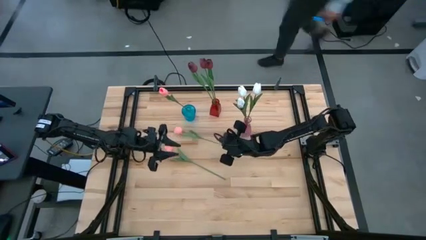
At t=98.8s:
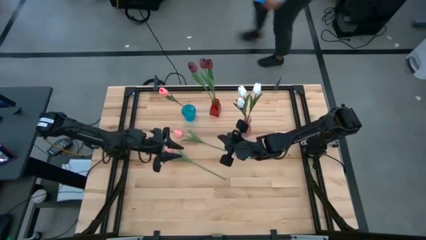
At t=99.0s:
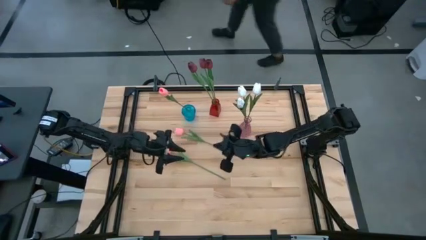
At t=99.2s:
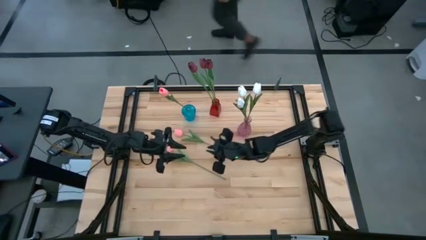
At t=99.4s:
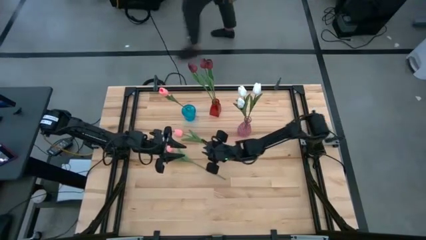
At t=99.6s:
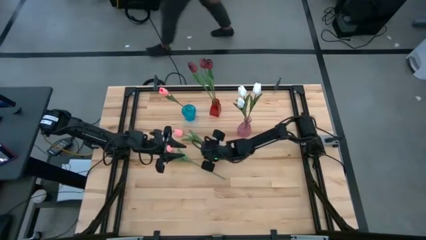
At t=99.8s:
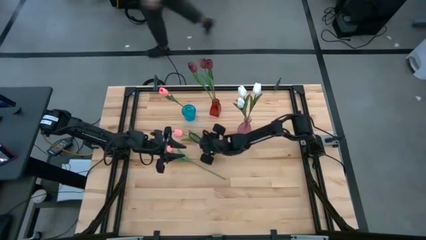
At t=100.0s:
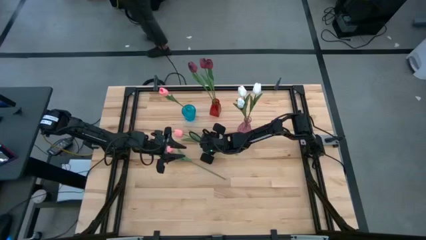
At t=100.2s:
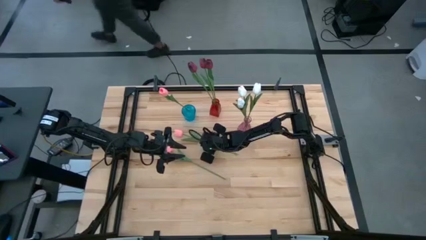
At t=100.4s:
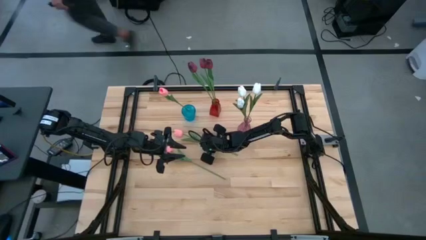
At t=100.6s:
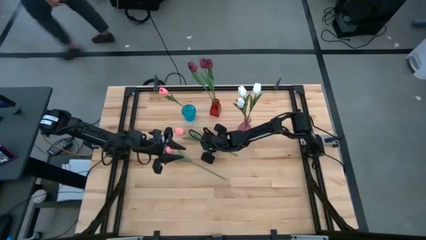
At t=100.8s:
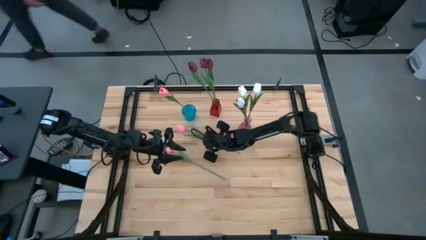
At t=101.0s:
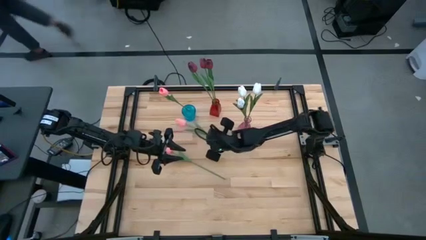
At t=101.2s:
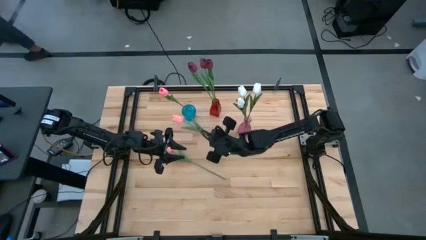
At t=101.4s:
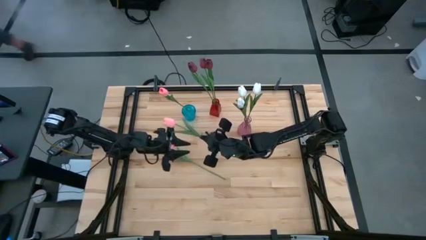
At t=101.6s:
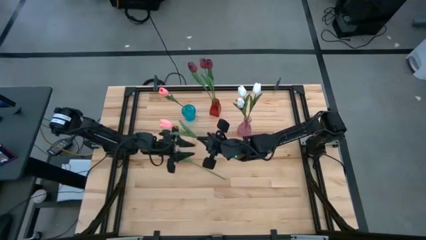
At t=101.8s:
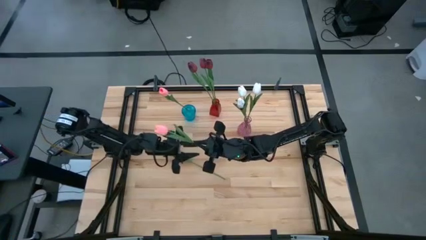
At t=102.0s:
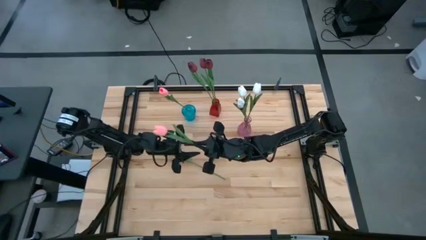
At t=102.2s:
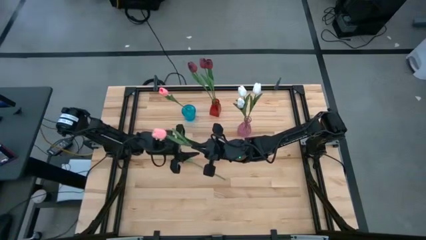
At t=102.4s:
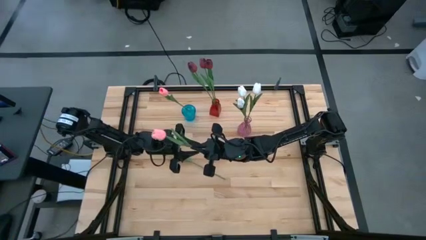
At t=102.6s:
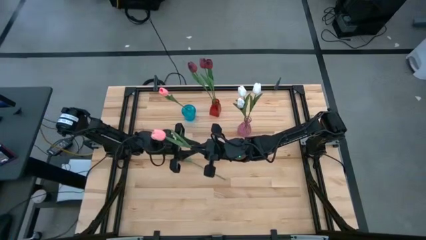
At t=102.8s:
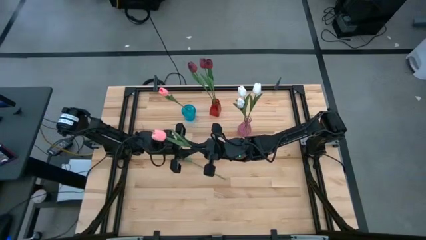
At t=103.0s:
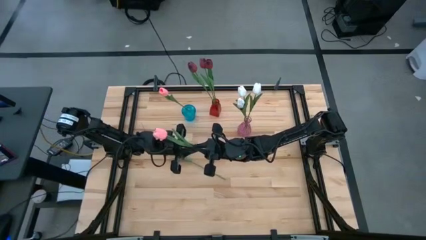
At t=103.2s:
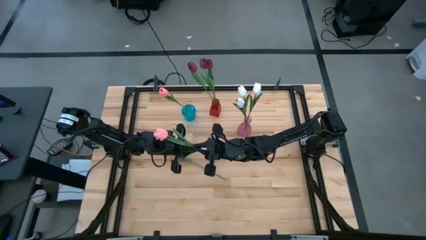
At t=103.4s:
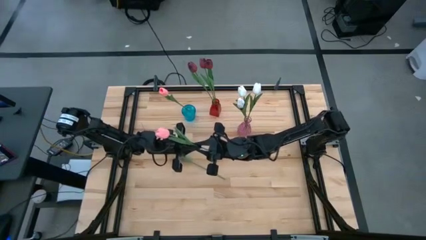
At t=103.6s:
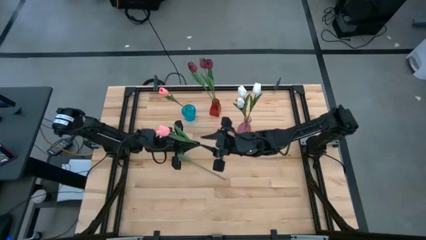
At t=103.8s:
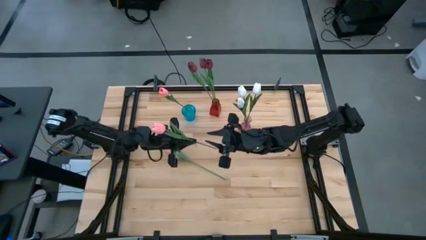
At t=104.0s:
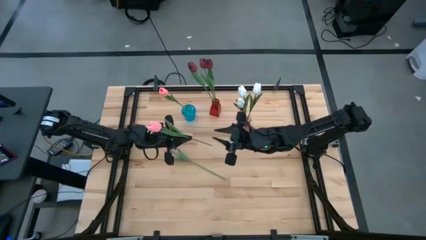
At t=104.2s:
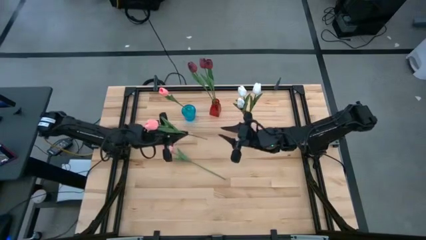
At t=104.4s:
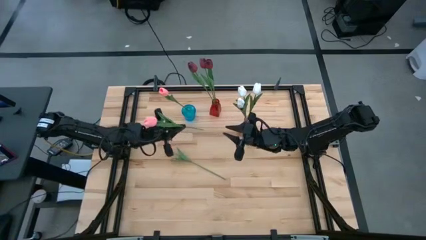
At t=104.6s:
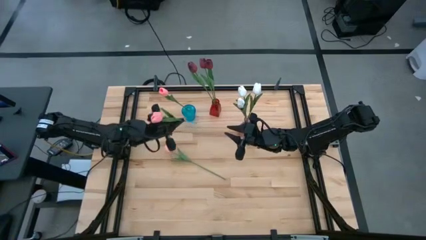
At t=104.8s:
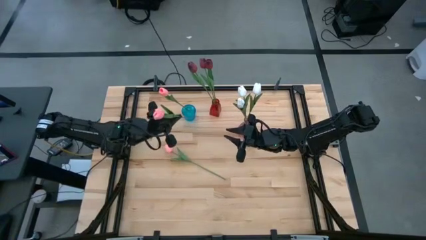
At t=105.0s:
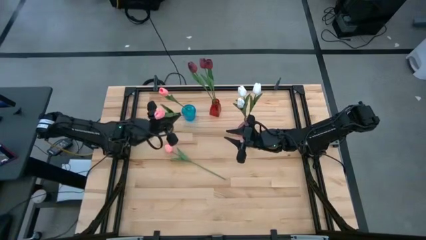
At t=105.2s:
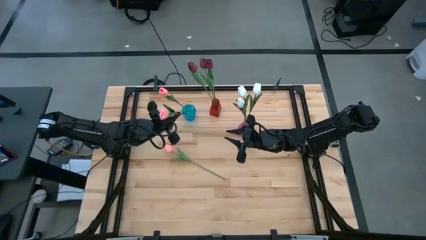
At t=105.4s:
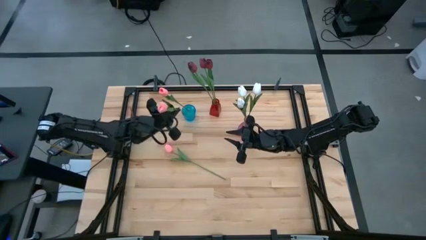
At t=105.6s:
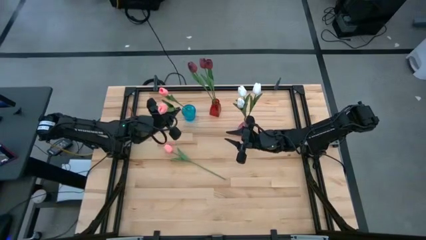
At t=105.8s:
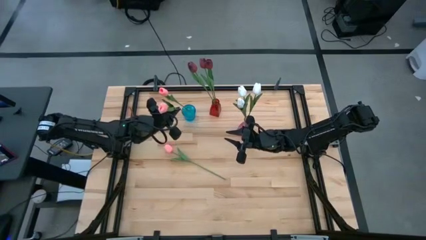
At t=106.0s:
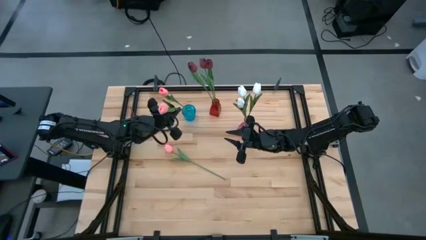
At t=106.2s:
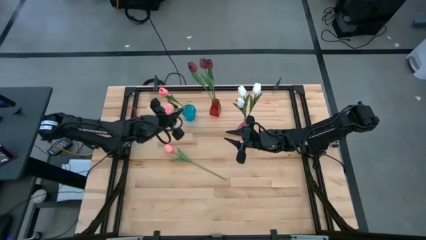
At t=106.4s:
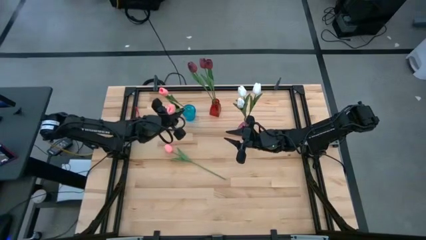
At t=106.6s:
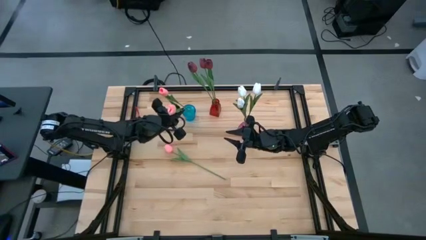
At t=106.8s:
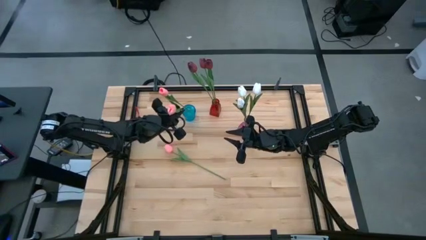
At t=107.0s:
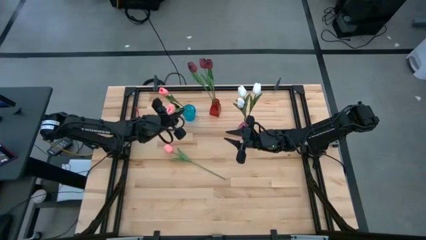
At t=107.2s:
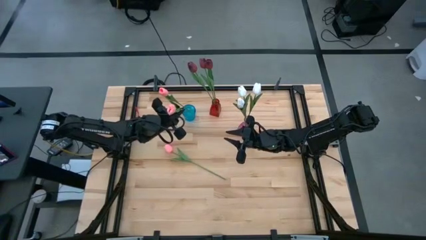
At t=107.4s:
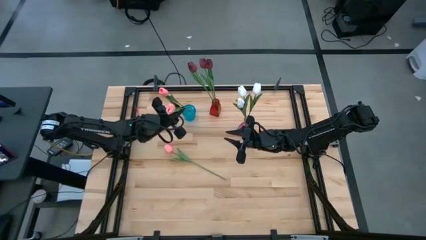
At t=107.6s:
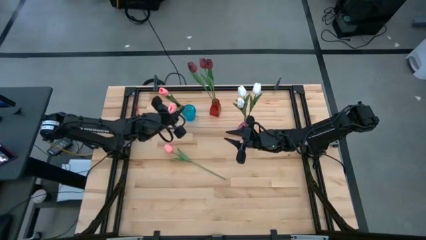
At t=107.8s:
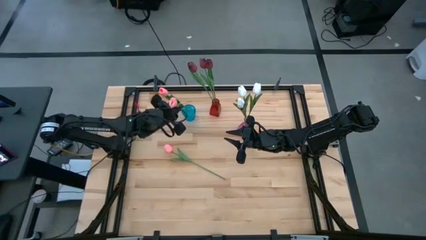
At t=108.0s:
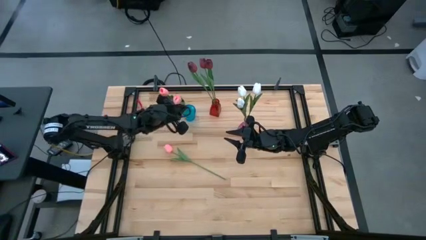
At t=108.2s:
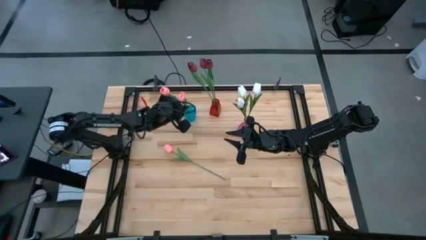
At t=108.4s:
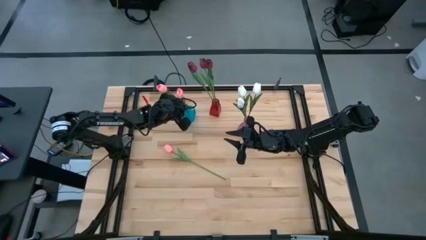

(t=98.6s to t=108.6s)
Task: Sort flowers into vase by color
Put the top pink flower into the blue vase

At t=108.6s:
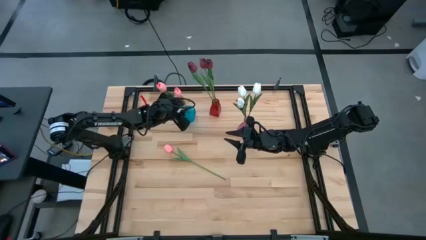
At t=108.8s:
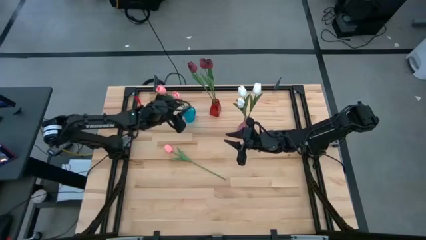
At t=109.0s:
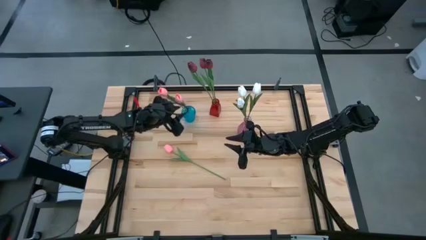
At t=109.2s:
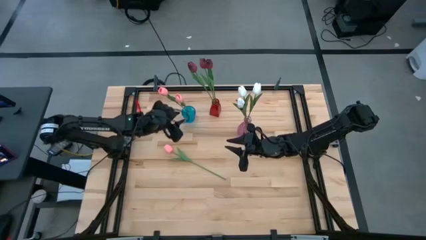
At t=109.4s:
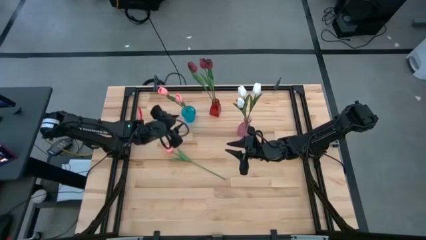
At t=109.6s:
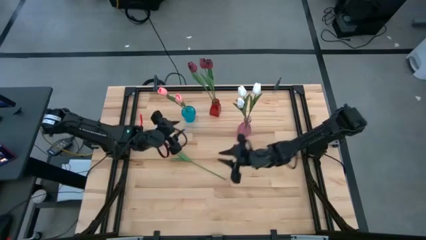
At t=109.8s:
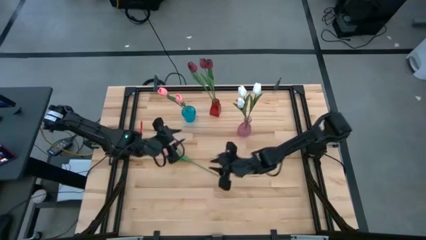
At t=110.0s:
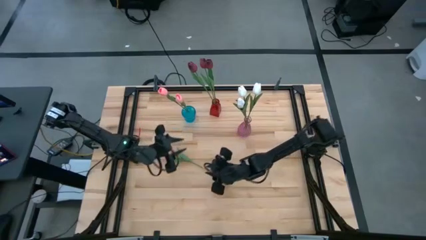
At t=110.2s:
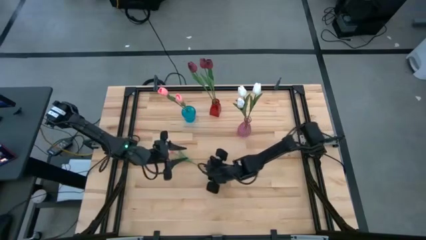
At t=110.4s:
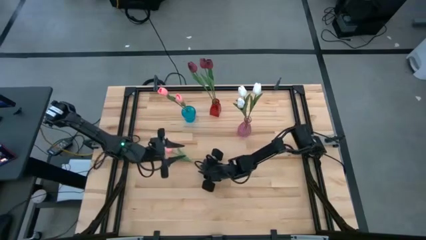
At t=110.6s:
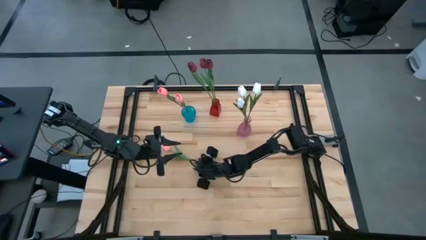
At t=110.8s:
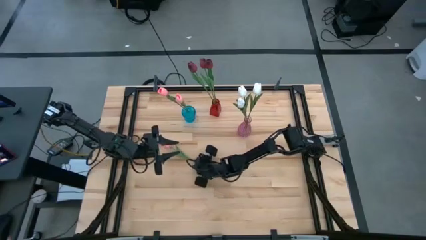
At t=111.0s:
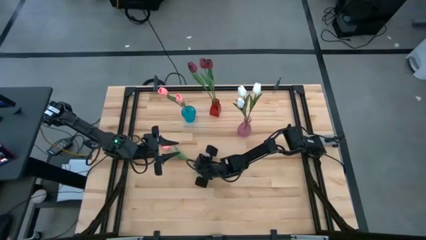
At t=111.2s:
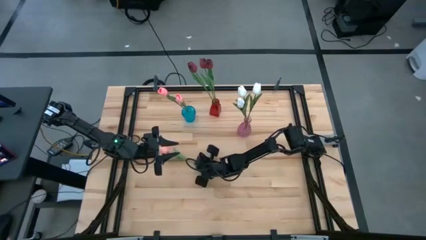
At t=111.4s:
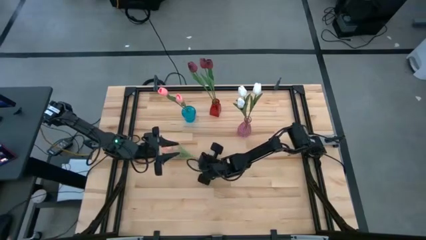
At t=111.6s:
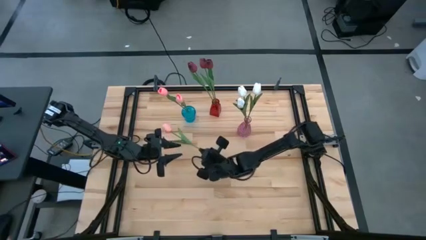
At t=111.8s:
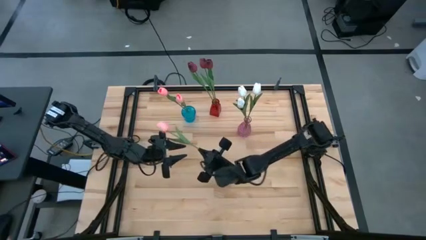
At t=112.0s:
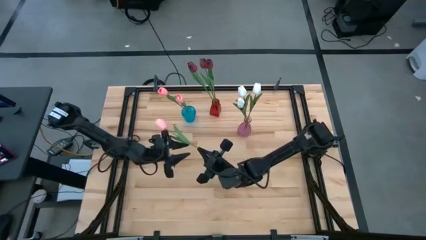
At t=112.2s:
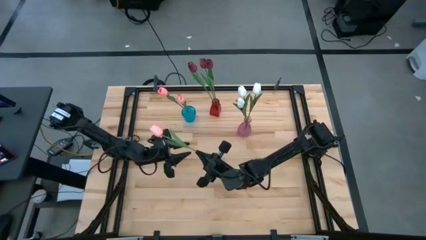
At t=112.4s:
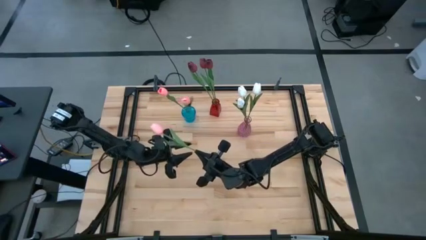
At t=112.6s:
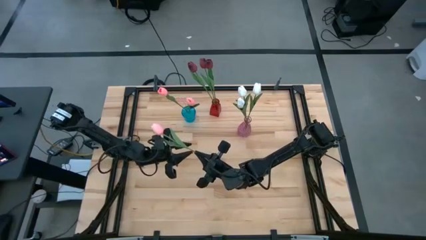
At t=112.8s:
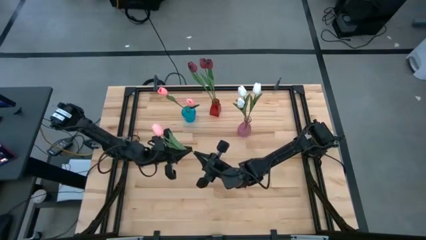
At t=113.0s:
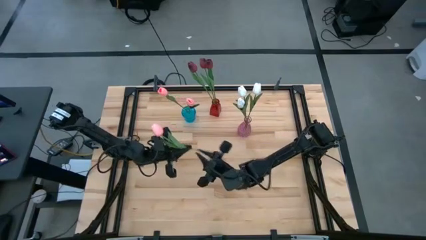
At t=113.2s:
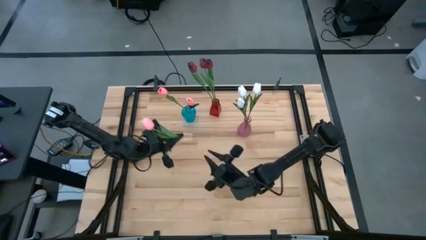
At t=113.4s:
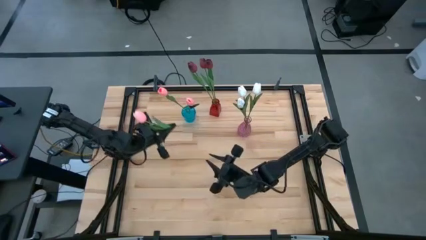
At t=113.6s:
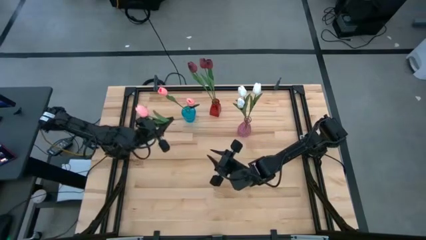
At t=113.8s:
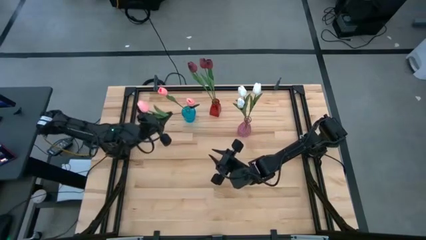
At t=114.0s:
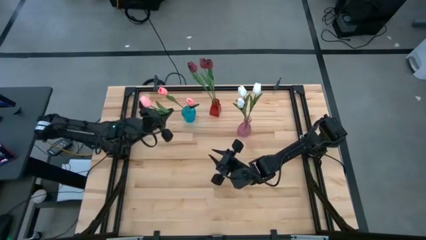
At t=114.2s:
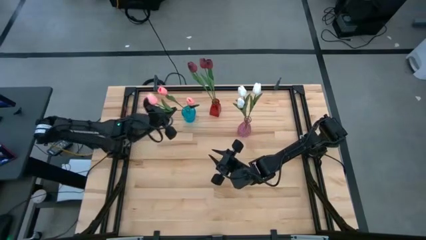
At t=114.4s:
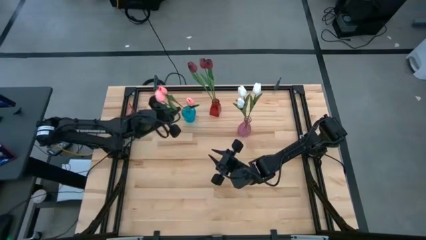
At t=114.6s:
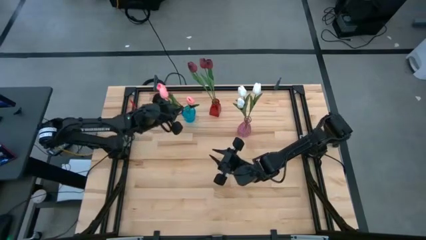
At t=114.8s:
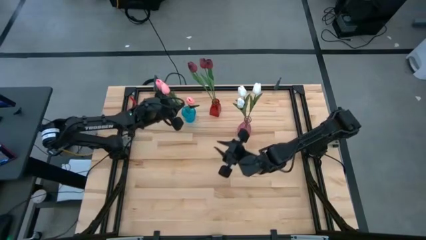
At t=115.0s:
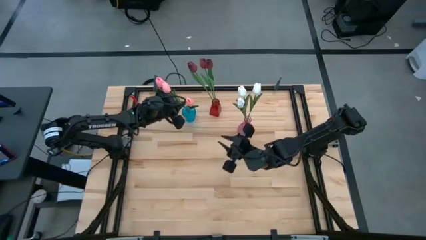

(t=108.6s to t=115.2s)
Put the pink flower into the blue vase
